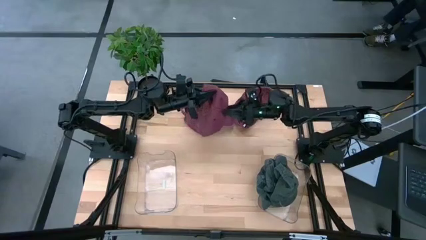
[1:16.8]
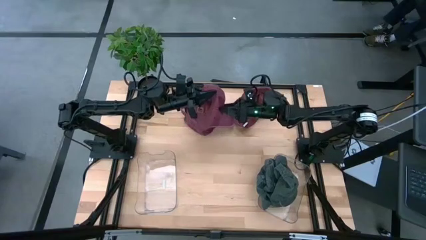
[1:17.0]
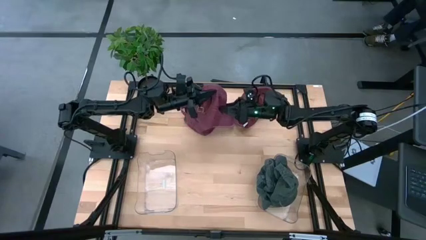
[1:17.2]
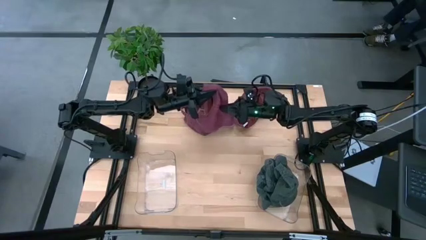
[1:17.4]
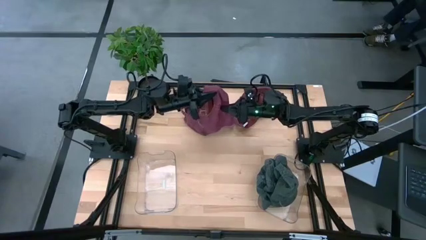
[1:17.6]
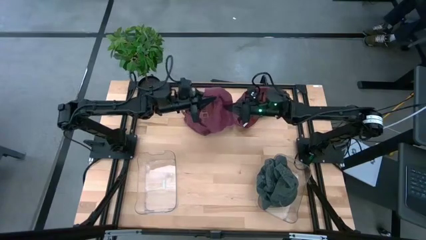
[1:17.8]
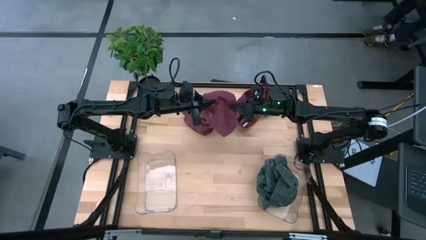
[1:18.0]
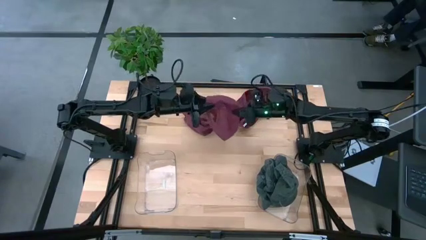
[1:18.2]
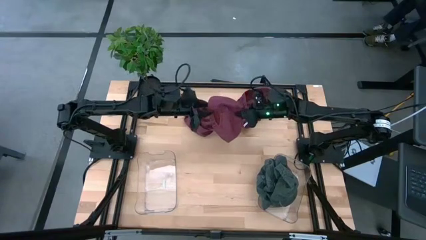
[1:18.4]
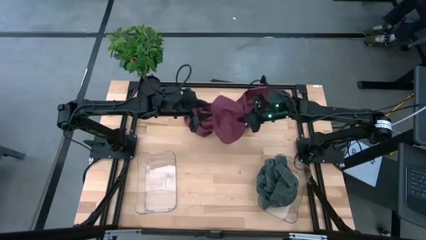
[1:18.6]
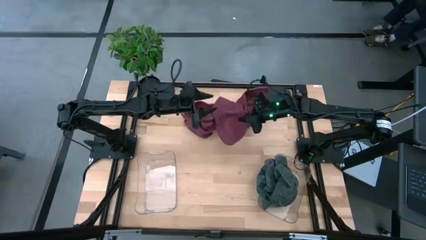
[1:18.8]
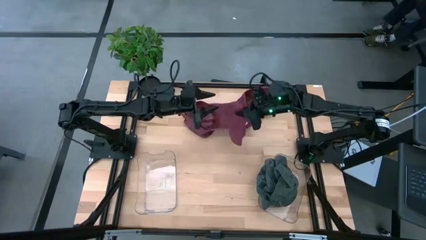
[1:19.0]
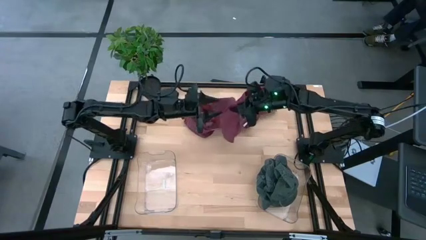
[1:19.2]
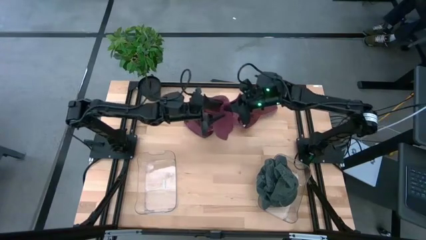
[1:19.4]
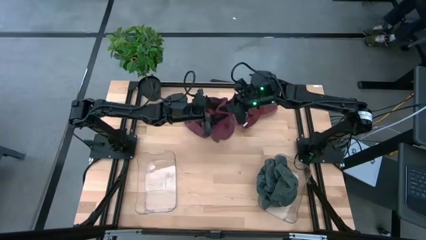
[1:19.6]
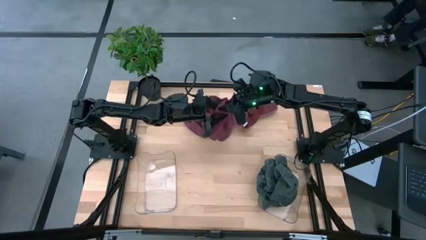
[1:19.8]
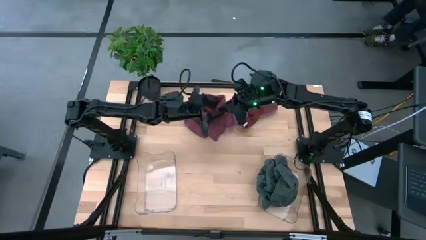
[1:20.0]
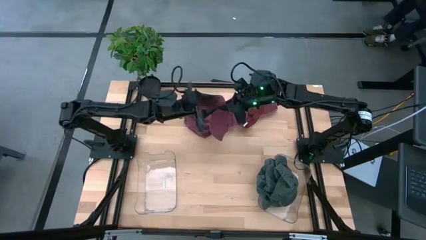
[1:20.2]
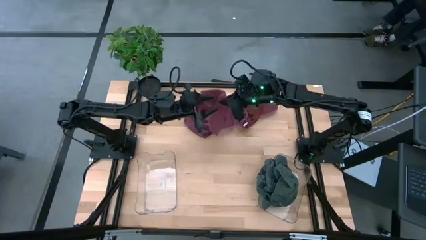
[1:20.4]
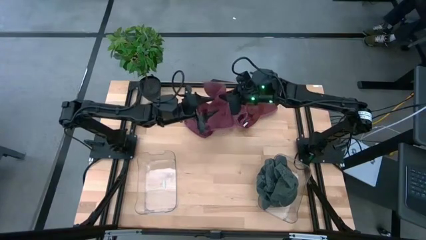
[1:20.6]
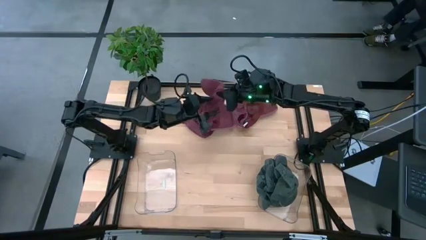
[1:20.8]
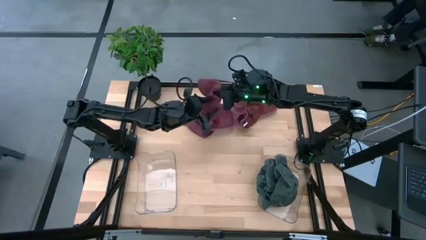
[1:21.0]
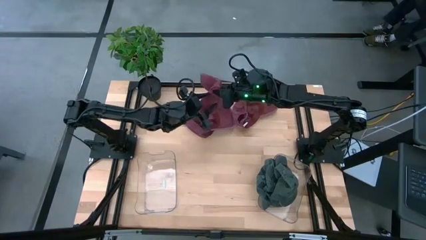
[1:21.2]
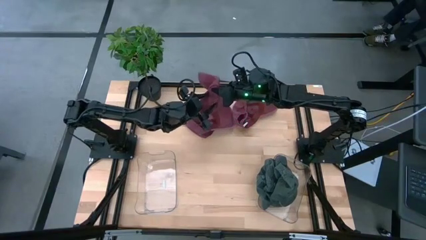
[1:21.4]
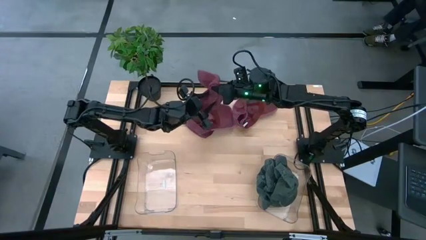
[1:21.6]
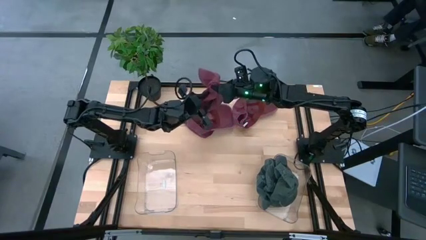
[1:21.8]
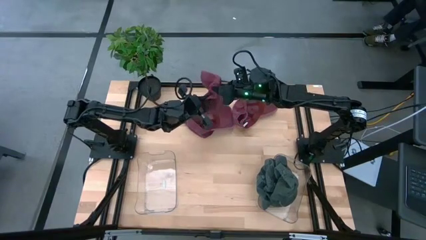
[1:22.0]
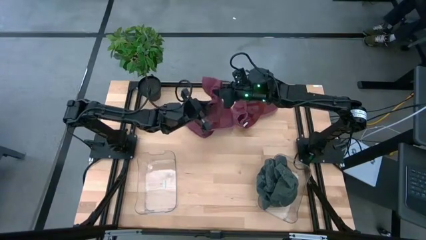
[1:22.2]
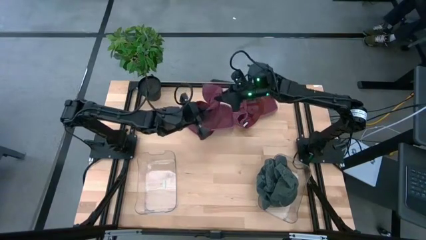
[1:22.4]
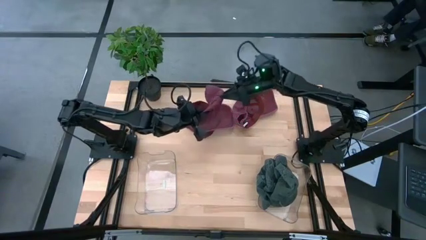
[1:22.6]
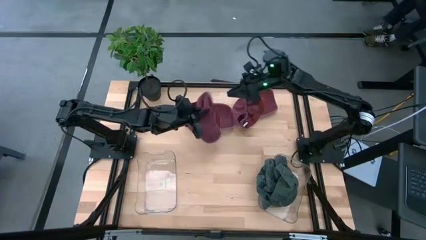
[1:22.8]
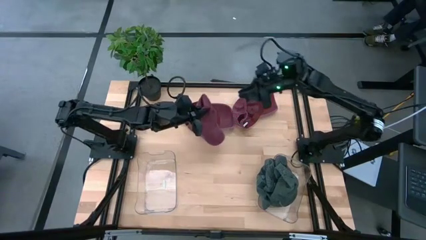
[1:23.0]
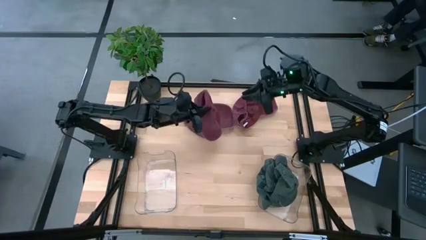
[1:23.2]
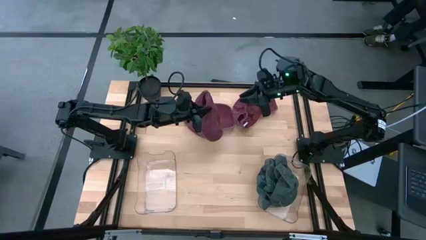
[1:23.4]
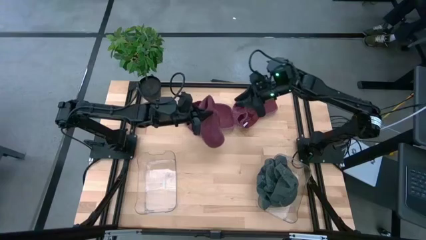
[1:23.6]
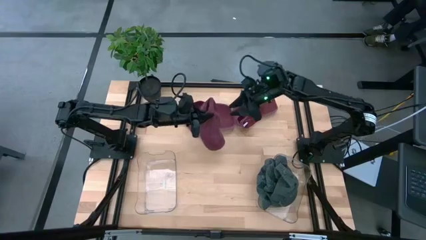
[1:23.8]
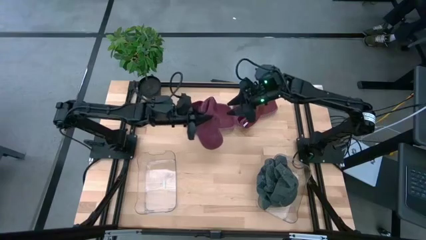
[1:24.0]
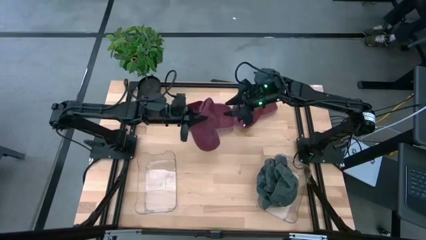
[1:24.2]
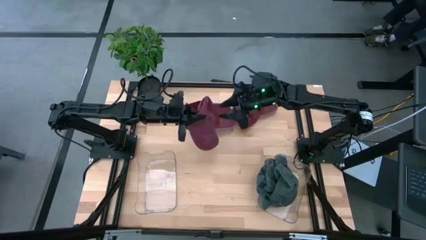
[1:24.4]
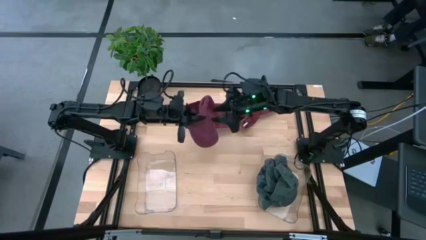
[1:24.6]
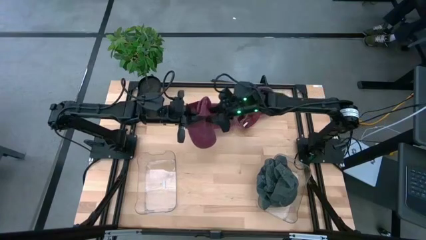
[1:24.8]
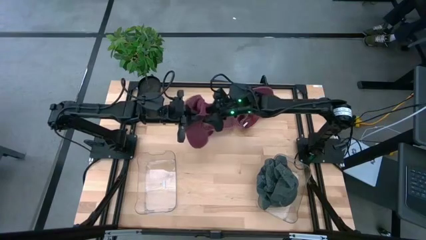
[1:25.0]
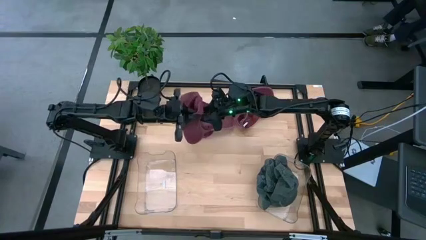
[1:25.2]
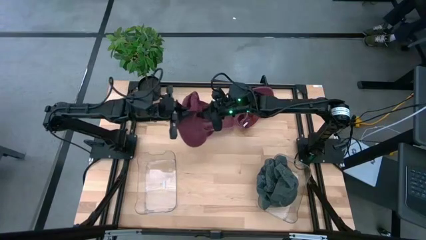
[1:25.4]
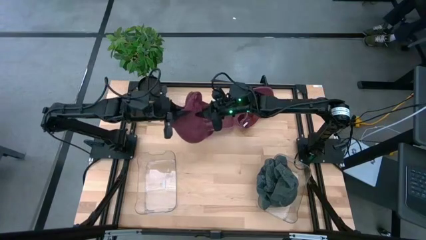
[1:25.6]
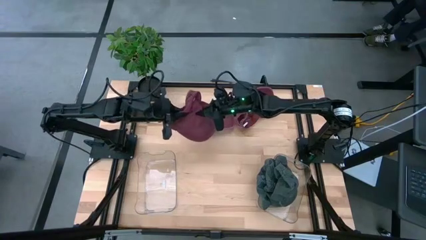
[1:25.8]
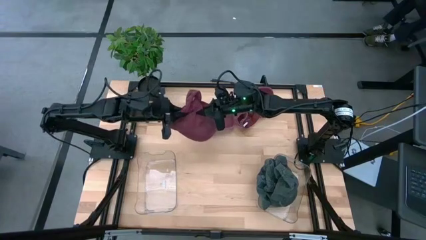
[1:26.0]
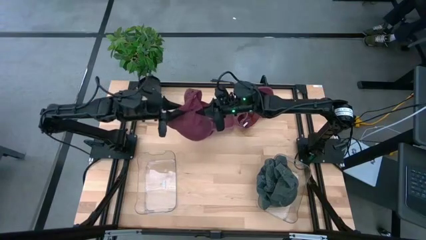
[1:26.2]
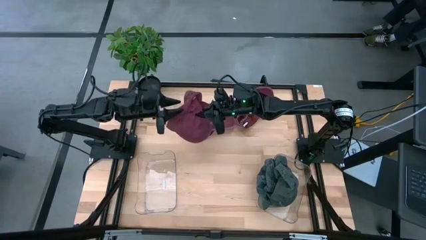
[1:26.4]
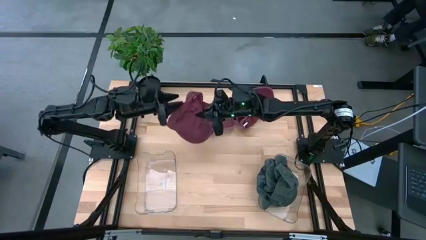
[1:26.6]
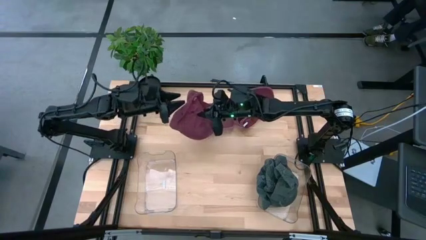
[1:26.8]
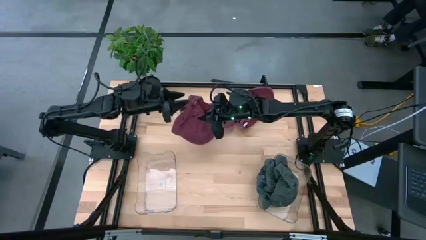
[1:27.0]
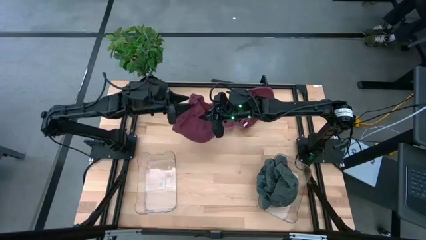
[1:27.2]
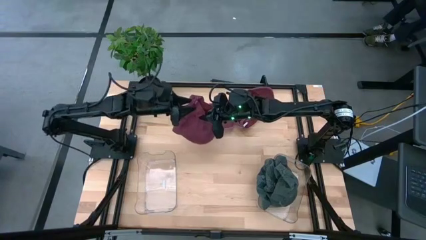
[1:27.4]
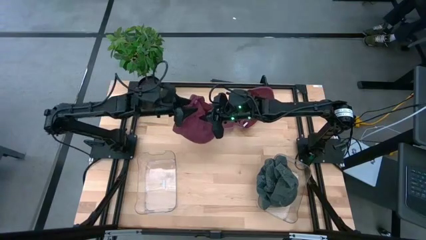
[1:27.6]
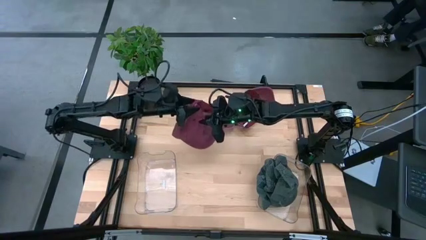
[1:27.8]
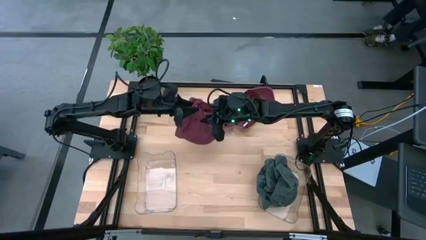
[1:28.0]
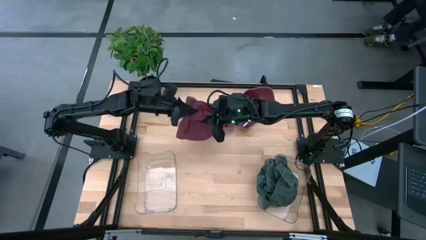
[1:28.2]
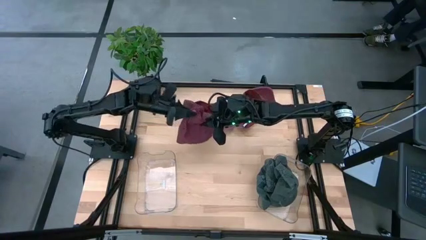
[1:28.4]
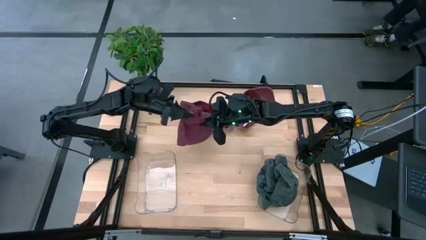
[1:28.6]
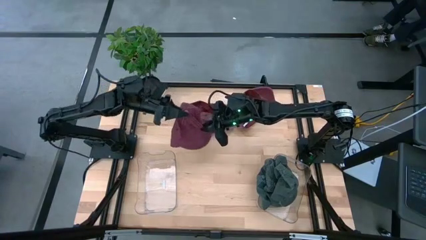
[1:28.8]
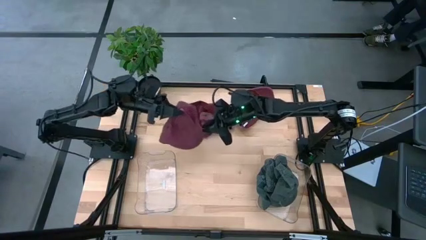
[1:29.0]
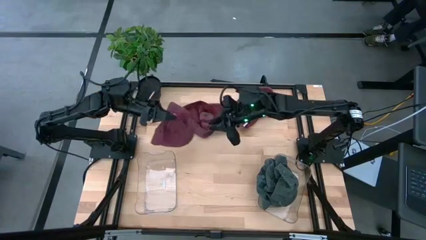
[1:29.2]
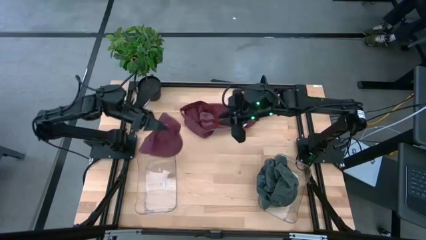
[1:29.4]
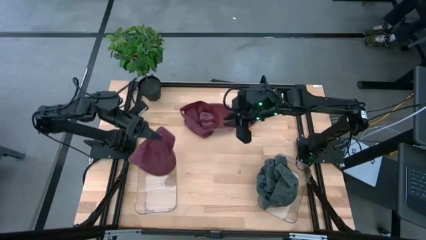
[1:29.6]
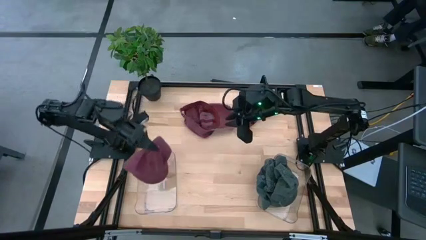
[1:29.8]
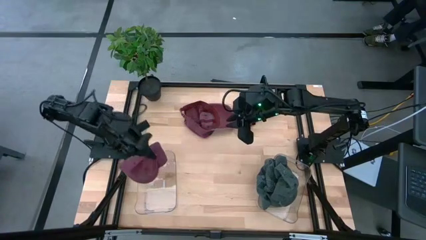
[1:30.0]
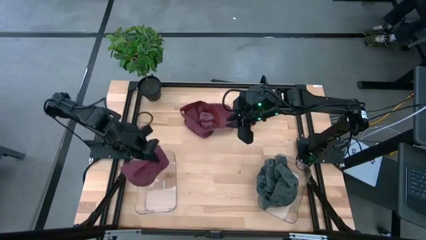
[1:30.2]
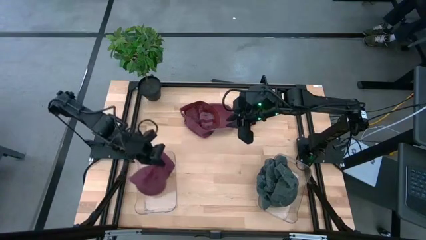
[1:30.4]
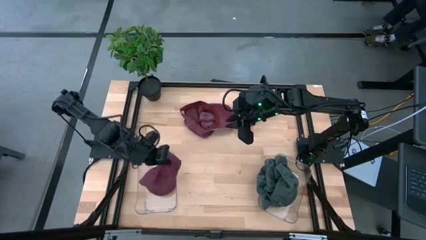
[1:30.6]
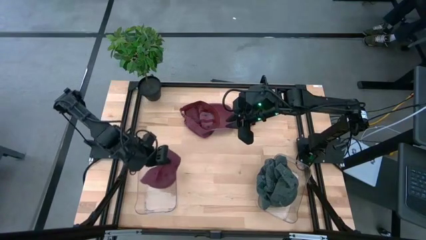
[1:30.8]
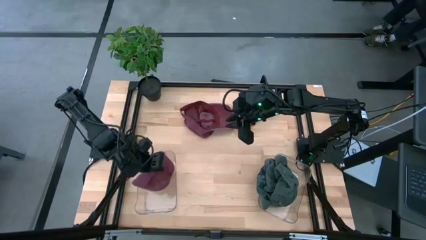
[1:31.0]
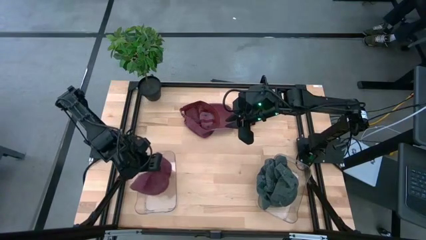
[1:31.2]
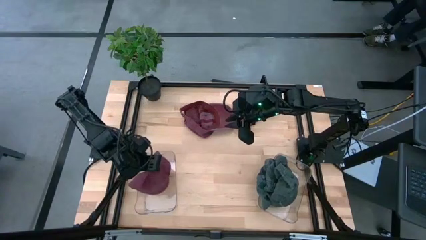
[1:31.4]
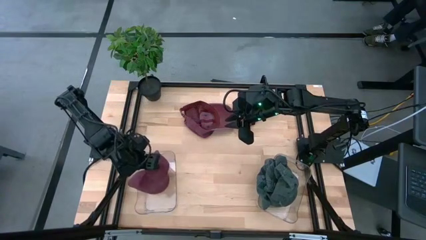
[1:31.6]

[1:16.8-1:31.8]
Task: Pick & Place hat
Put the bottom left red cap into the left transparent bin

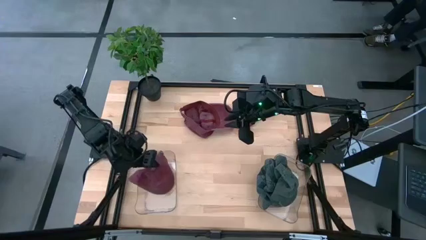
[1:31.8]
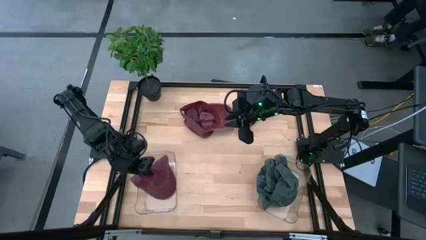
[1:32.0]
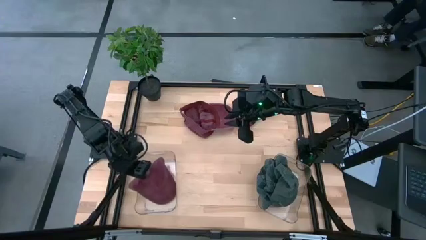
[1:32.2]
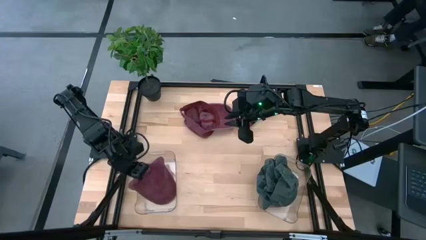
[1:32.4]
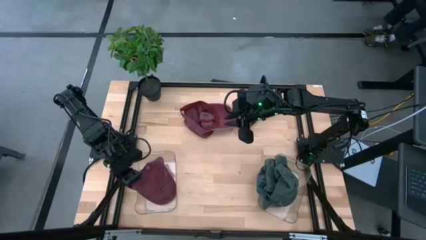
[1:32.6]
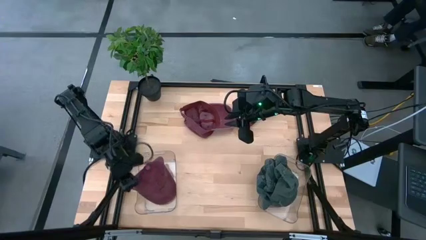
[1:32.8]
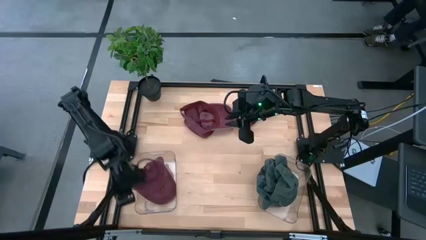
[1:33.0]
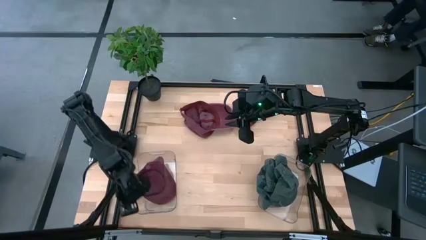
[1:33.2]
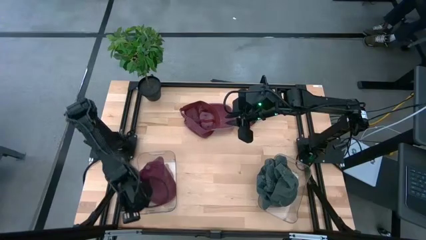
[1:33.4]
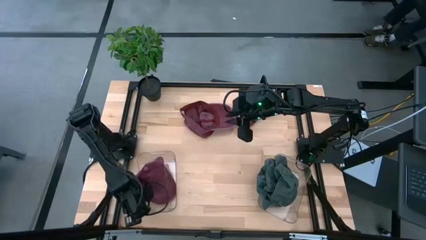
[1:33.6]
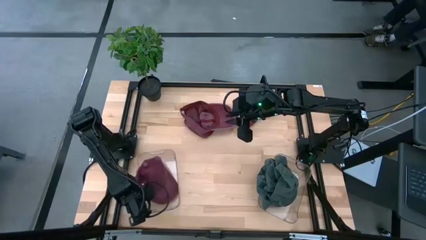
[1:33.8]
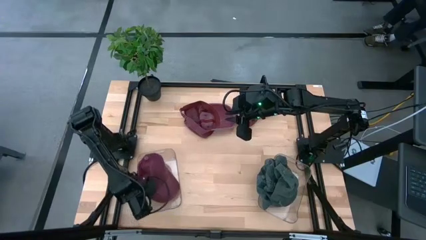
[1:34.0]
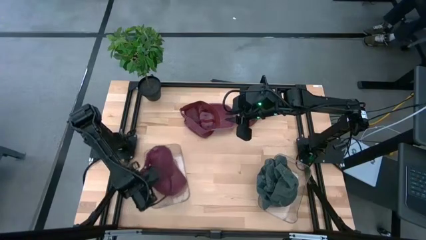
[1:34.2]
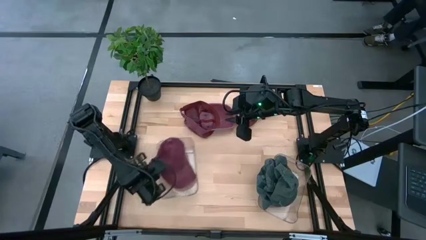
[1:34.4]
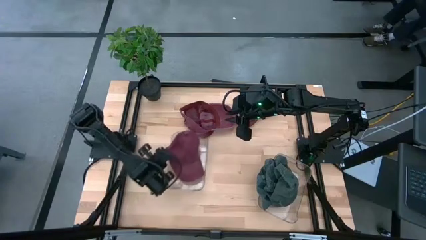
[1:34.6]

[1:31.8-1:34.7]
Move the left transparent bin to the center of the table
